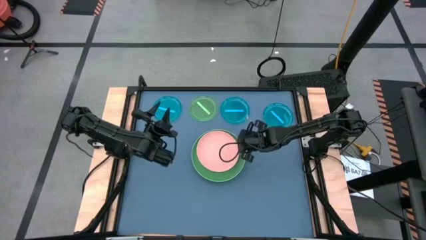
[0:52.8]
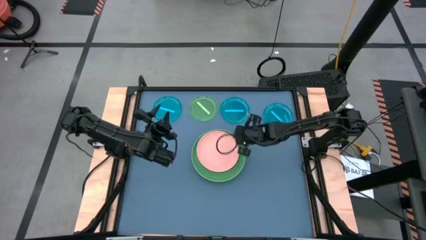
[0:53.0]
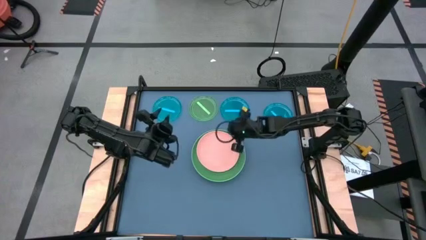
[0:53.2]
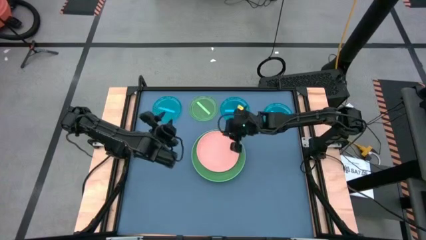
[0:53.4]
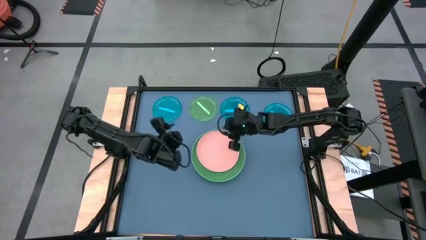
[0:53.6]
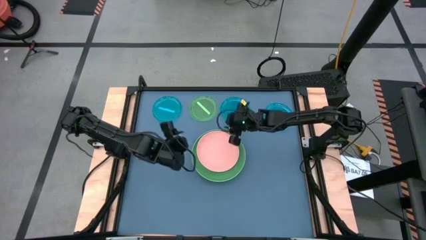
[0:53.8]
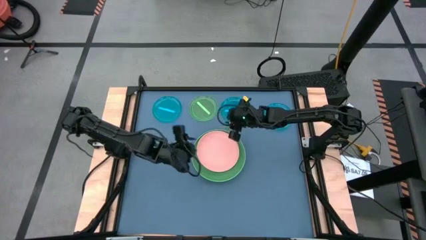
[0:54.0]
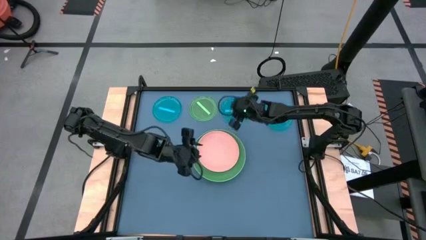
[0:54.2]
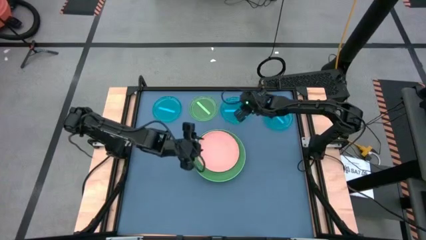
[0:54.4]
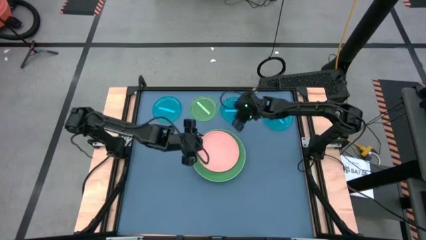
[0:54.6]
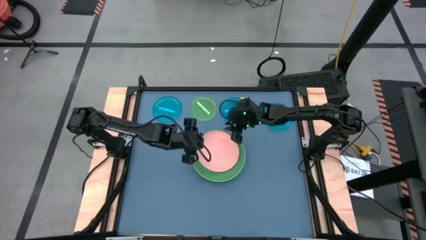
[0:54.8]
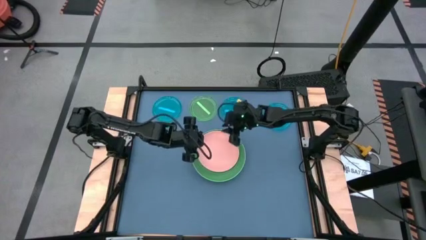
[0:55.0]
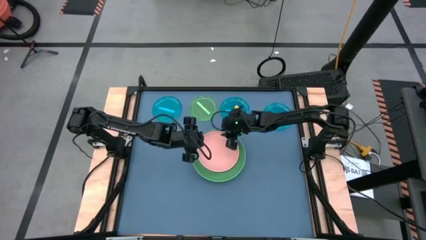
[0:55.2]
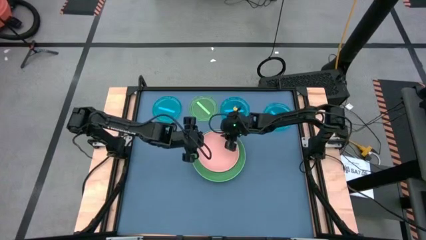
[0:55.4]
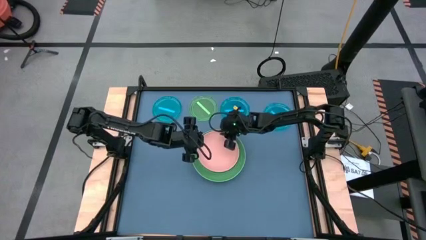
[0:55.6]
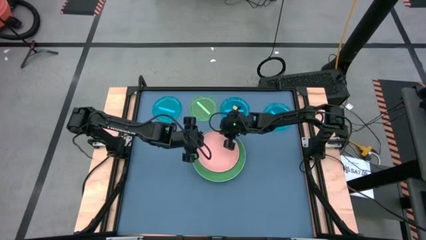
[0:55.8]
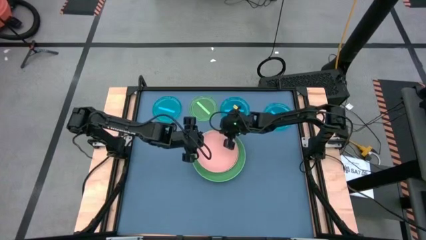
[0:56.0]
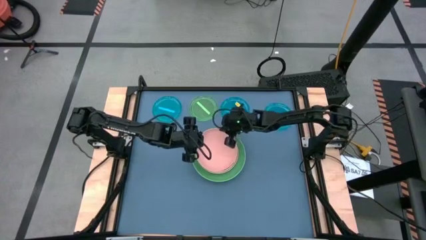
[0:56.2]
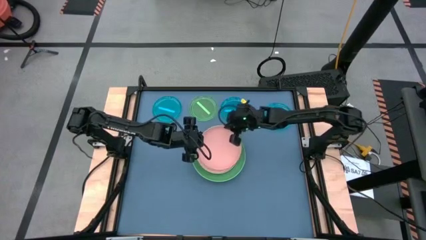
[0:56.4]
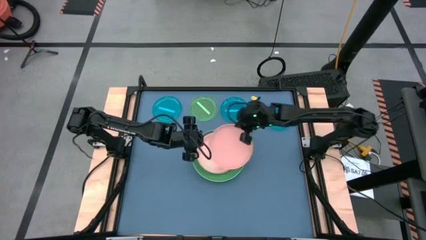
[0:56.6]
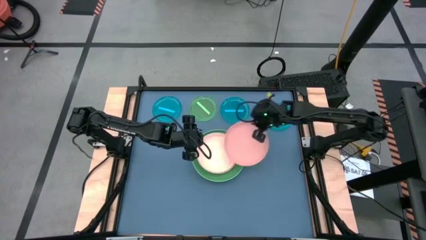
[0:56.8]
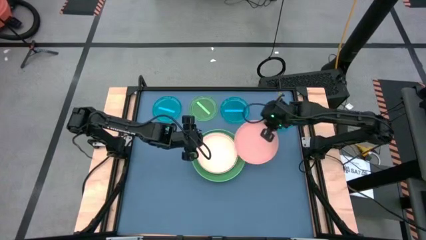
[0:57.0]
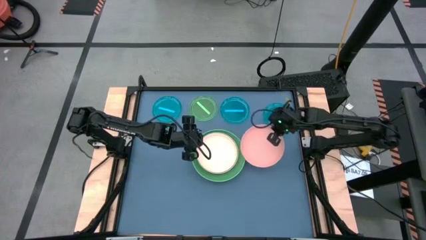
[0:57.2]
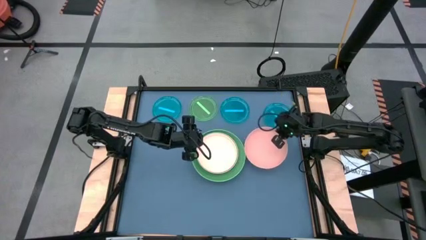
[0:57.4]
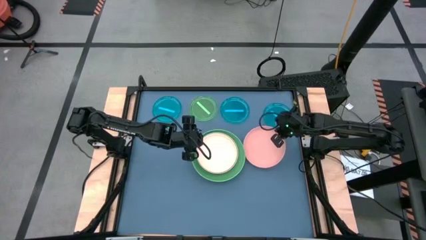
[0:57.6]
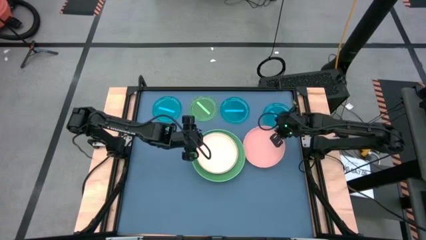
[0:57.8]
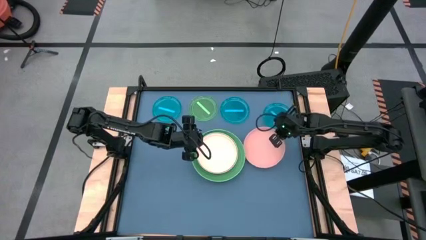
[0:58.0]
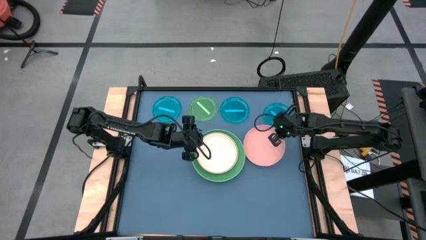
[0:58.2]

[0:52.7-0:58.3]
Task: Stack plastic plates
Remove the orange plate from the stacked plates

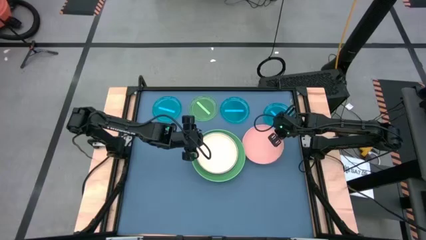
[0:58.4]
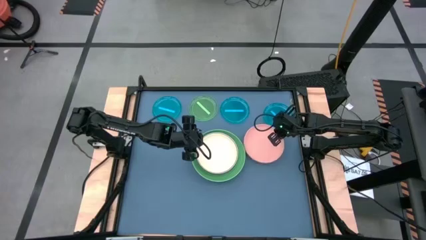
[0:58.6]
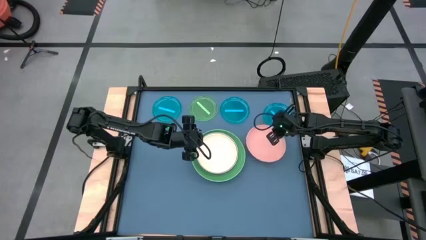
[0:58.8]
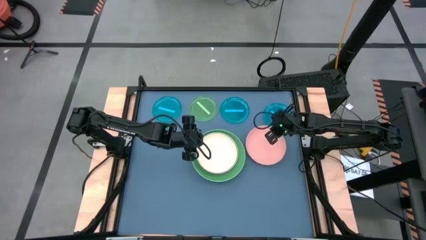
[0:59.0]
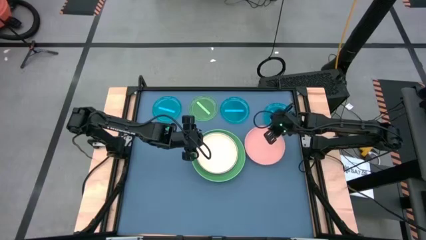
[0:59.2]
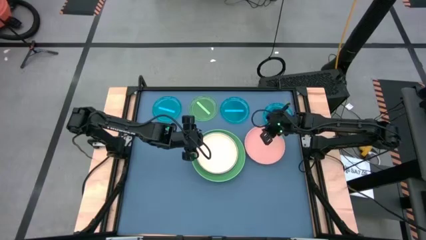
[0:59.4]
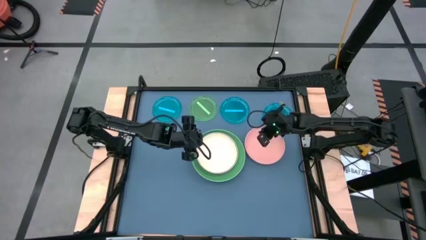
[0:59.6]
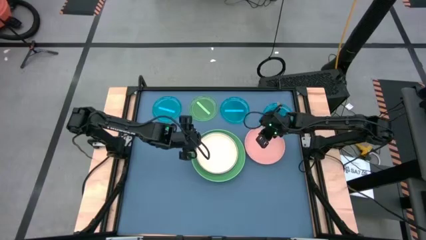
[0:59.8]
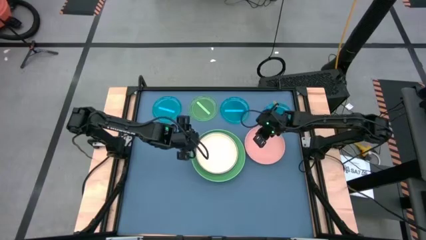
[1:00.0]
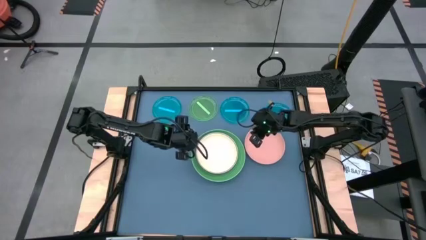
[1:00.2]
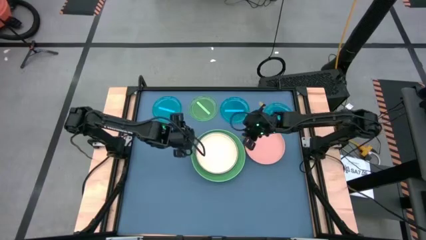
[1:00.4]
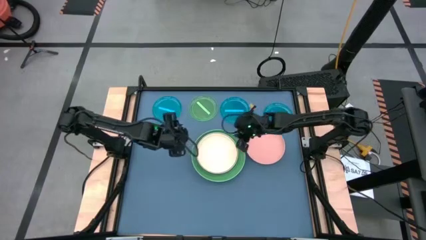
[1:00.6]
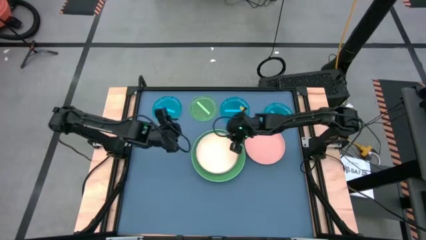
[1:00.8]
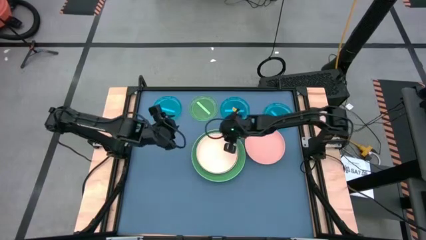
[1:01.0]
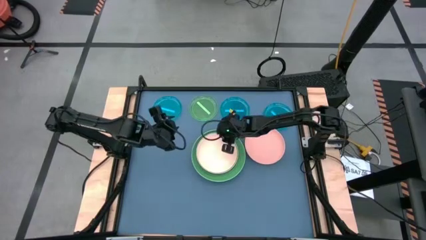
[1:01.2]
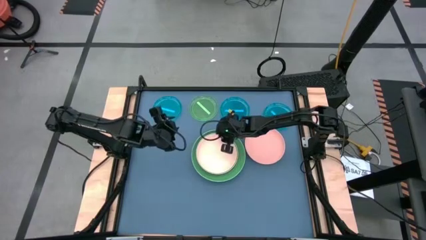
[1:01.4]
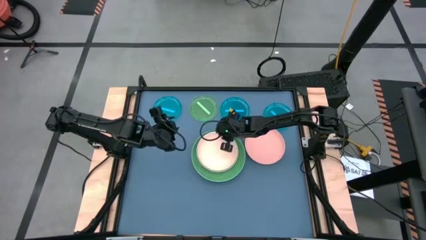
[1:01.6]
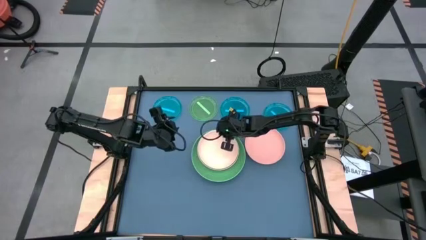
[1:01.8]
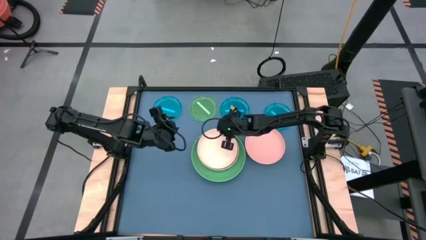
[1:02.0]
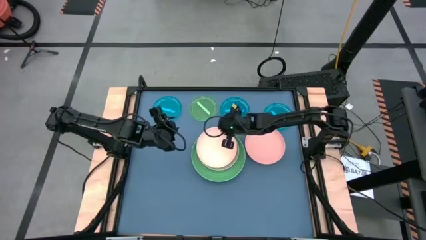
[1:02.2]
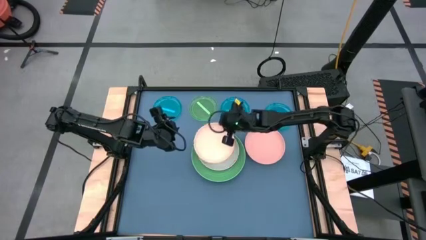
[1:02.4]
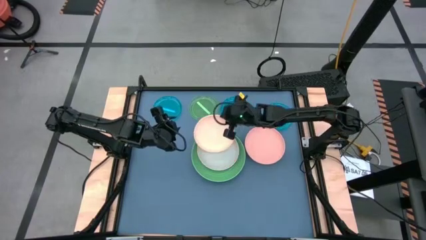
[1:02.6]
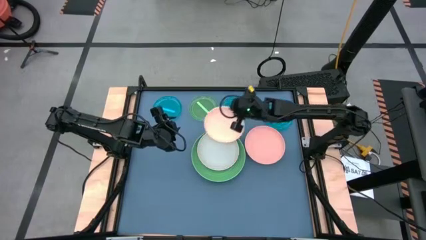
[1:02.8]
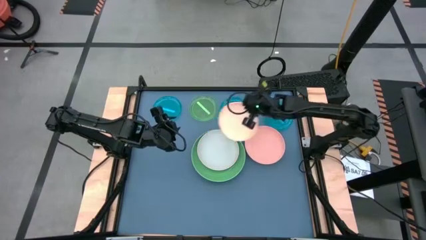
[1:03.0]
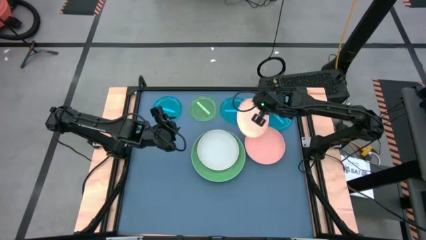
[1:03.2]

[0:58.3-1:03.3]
Remove the light orange plate from the stacked plates

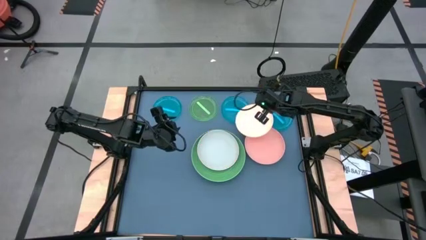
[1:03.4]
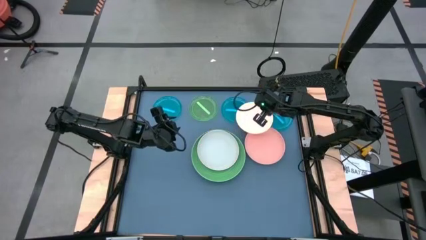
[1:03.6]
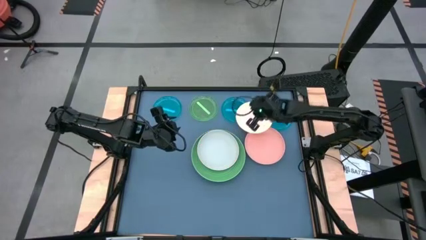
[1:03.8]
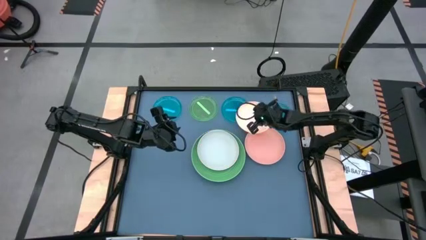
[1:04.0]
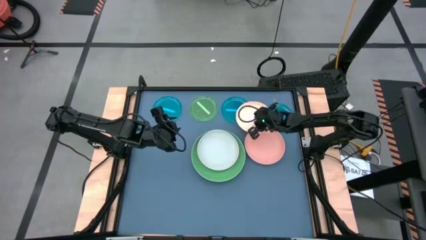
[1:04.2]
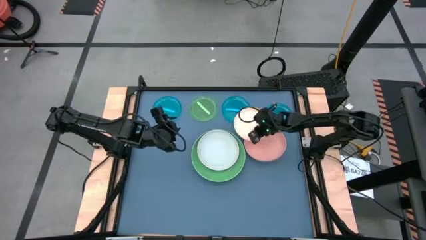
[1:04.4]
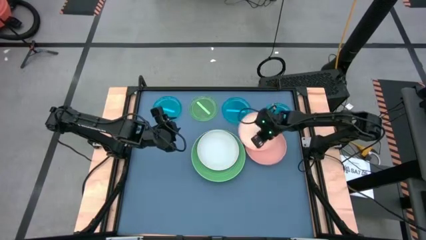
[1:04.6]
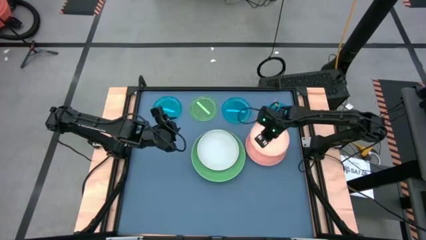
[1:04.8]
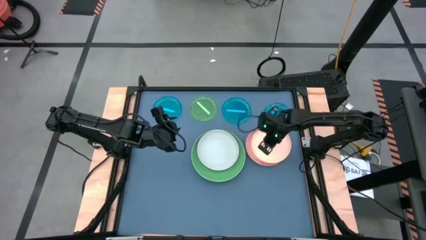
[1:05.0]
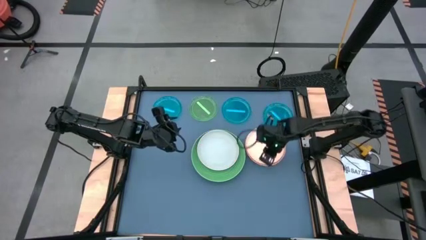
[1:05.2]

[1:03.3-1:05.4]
Stack the light orange plate on the orange plate

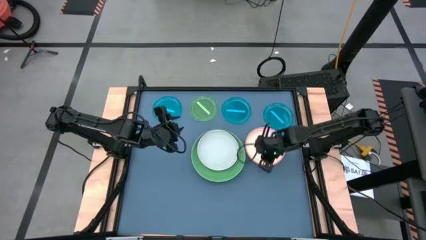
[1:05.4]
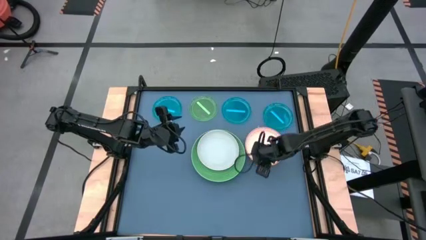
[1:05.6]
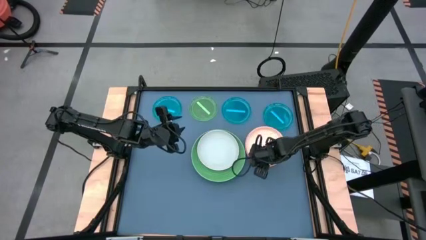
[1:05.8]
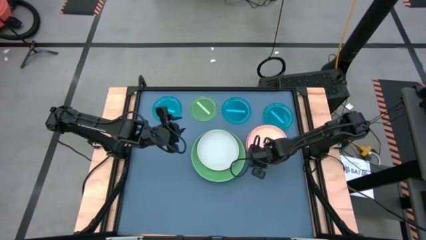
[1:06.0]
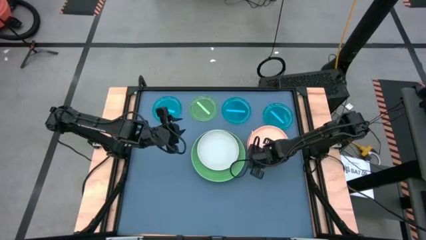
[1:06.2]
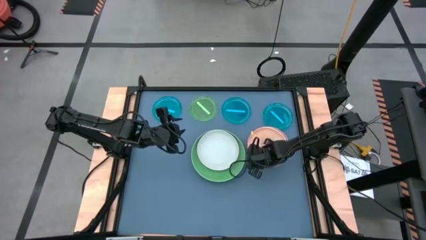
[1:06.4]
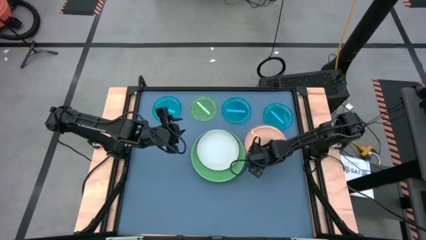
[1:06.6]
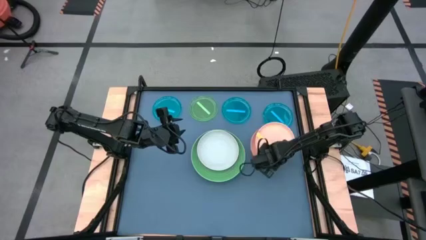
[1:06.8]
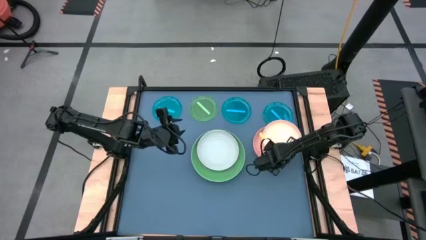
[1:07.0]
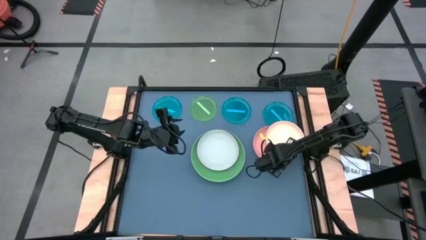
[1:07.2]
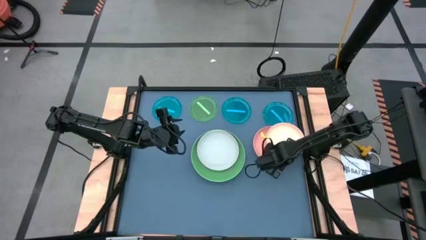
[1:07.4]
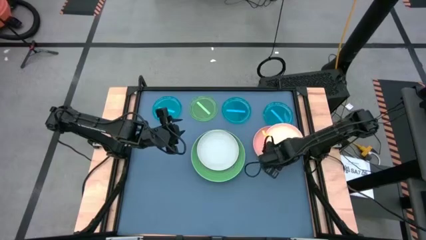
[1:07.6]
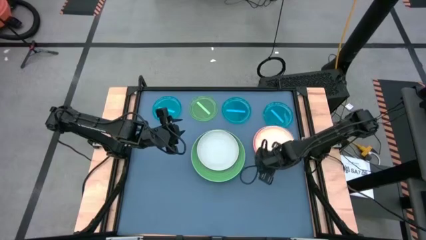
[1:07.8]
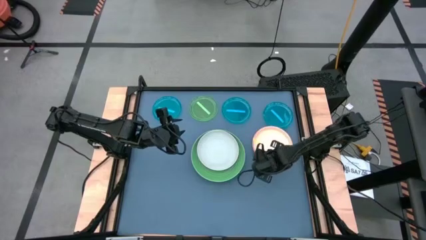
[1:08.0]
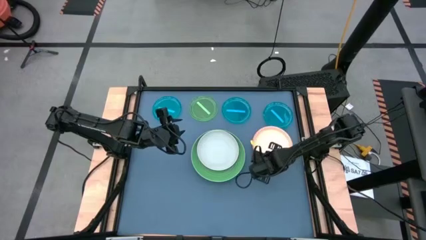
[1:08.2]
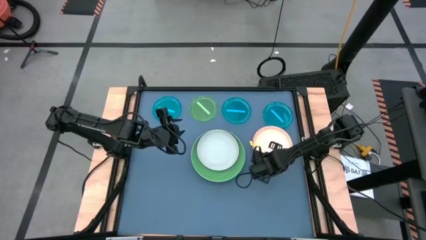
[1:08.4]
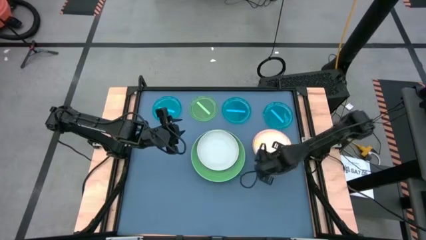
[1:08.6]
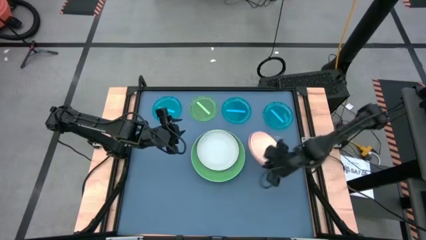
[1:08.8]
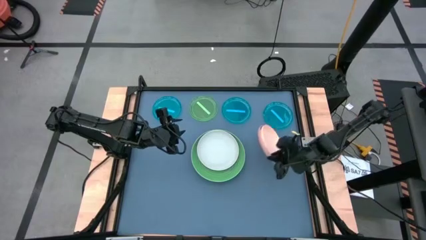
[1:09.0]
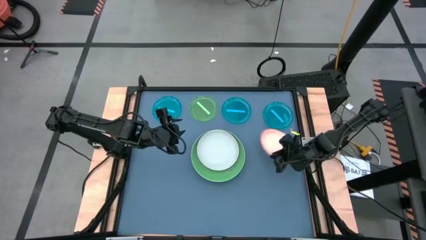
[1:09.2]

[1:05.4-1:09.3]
Remove the light orange plate from the orange plate to the middle left of the table
